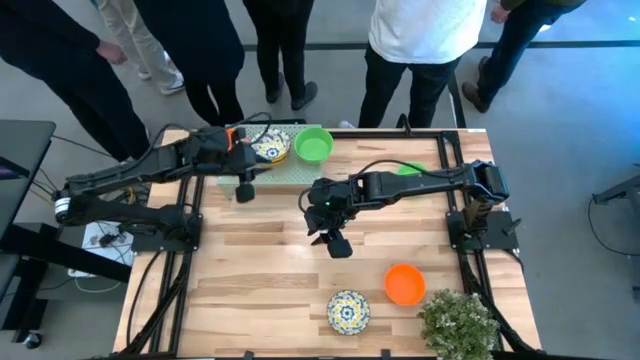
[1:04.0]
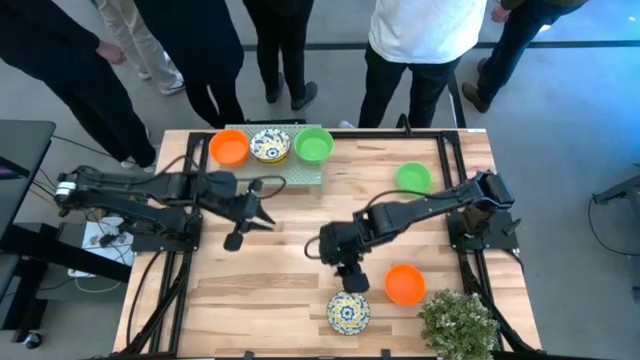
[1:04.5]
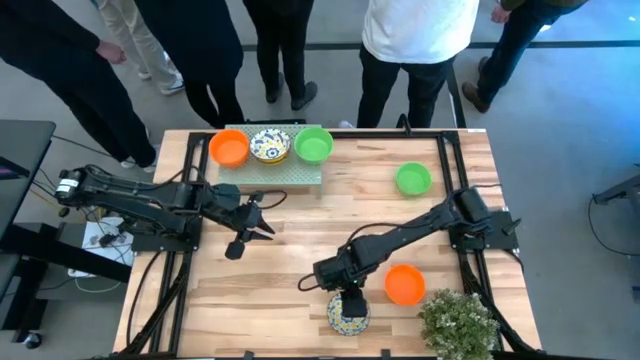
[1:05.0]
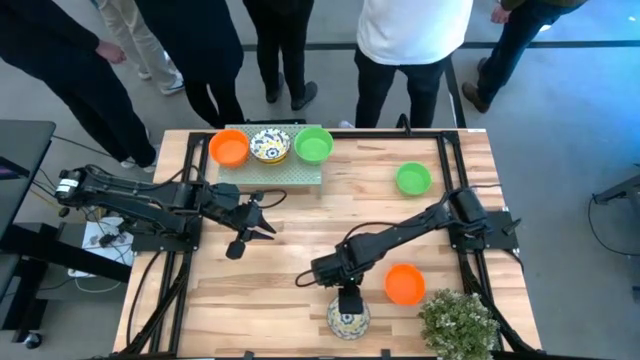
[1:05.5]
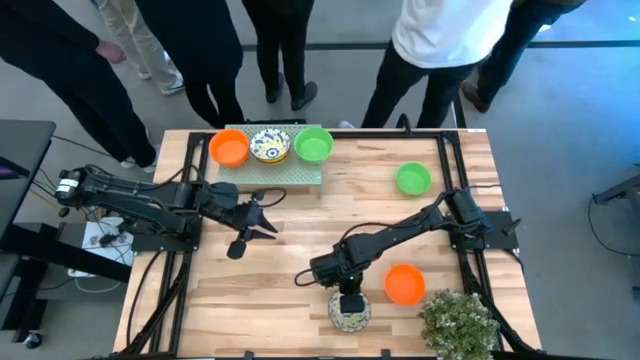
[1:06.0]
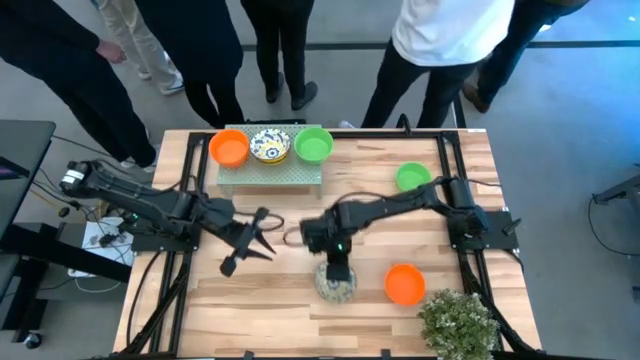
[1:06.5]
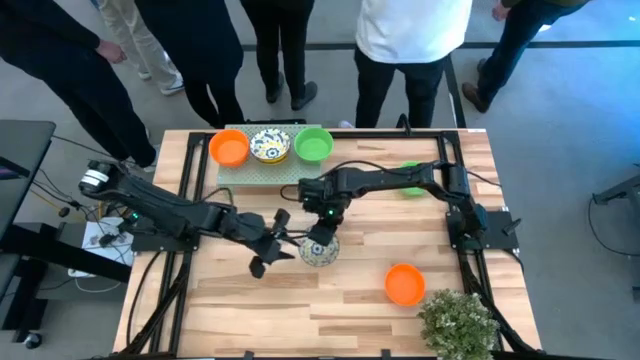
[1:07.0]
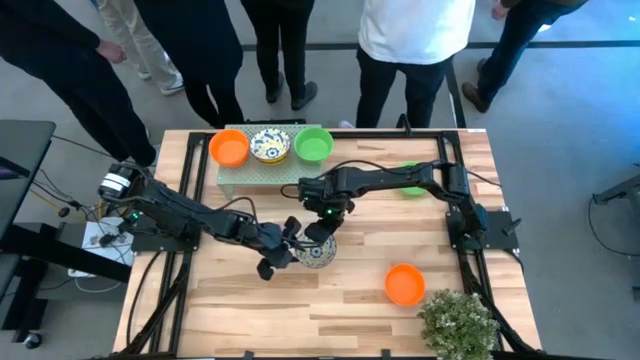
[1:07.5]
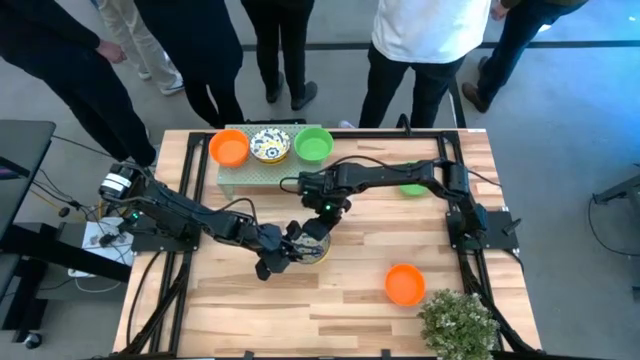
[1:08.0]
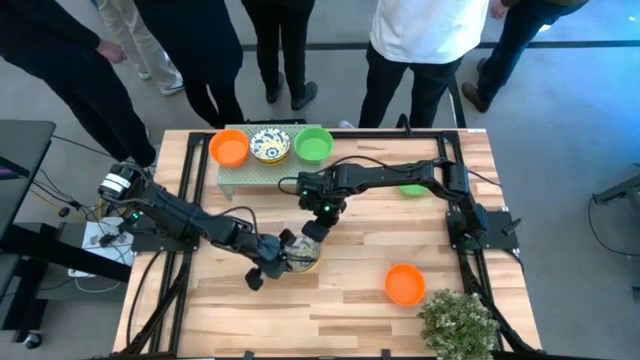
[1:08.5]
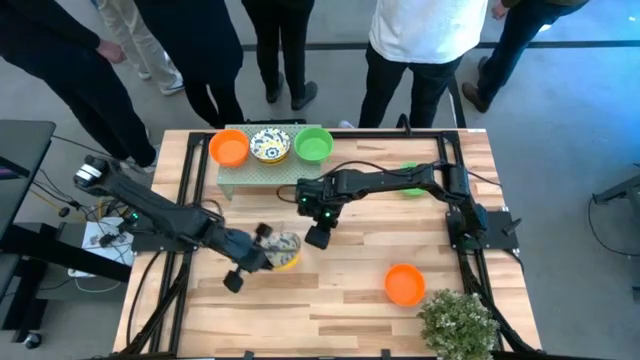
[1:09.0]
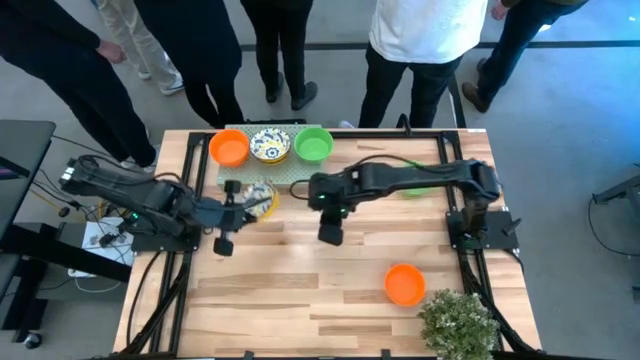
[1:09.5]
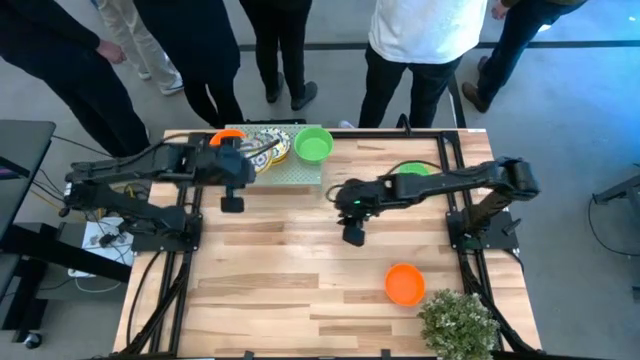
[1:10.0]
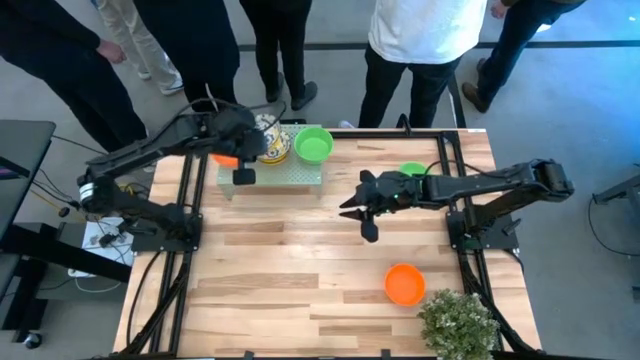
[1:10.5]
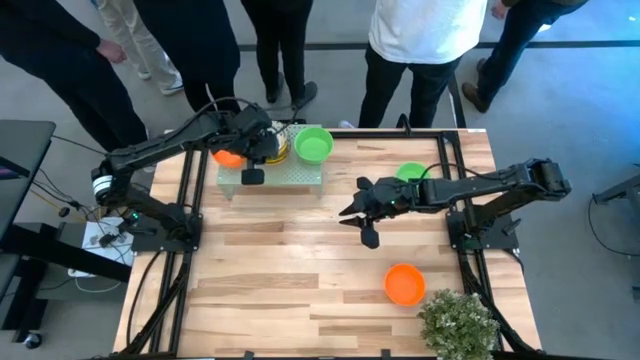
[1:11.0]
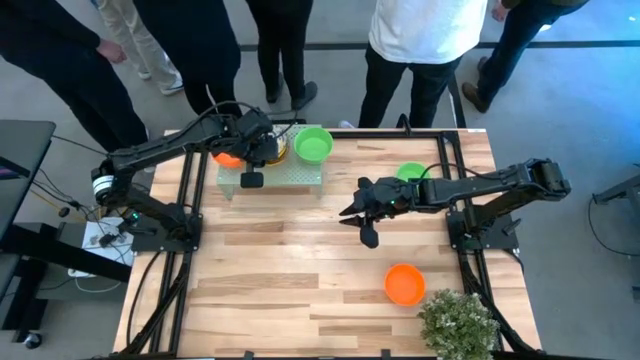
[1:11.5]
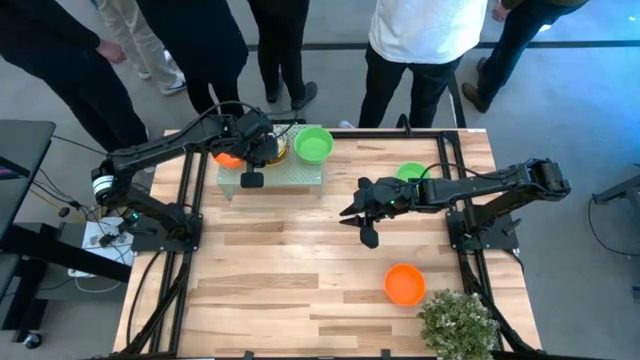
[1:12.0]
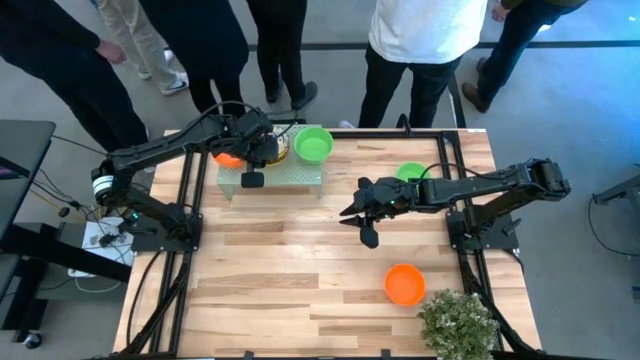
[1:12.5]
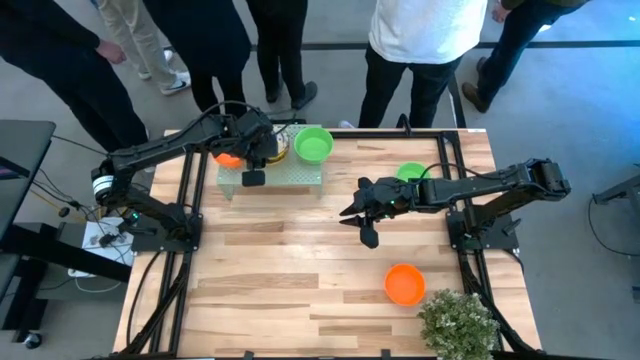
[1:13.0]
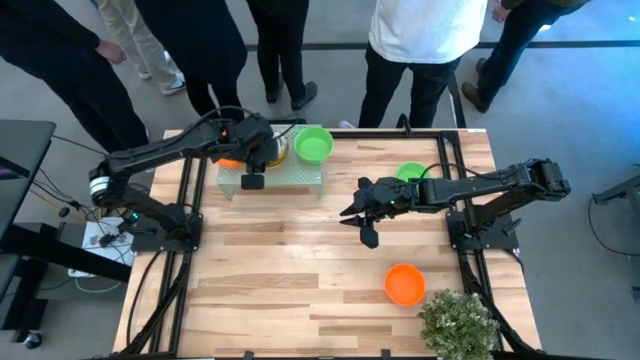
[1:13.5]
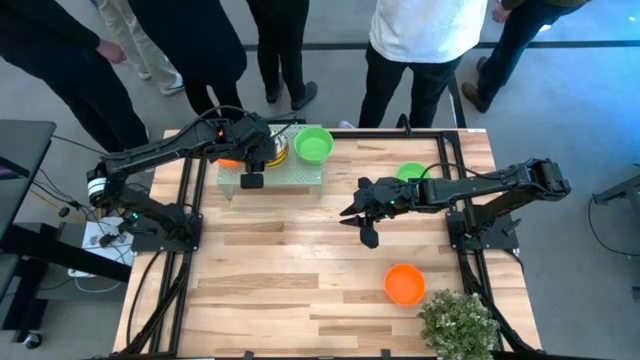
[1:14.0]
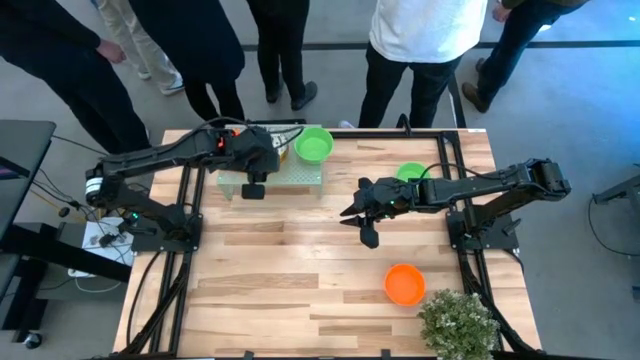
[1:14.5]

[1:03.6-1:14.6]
Task: Pick & Place Mini bowls
Stack the white patterned bowl on top of the other white patterned bowl on the shelf

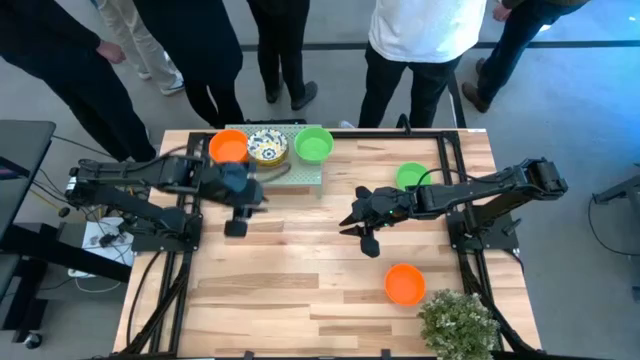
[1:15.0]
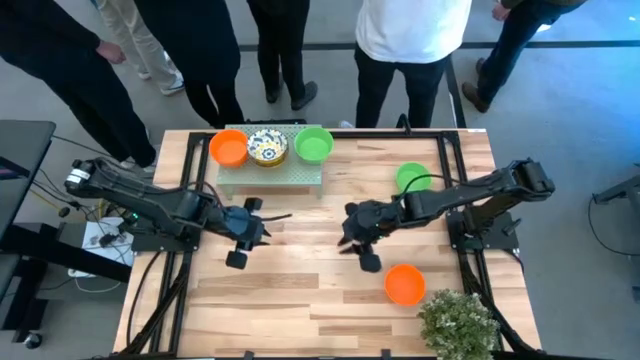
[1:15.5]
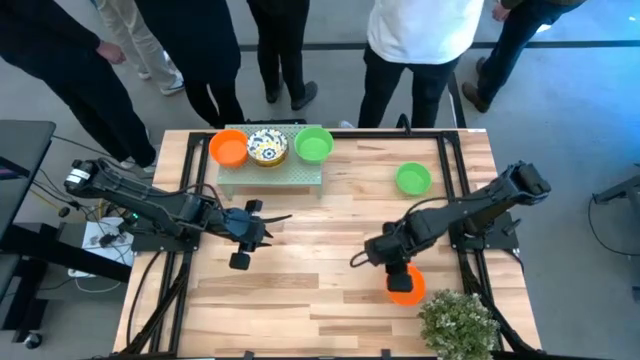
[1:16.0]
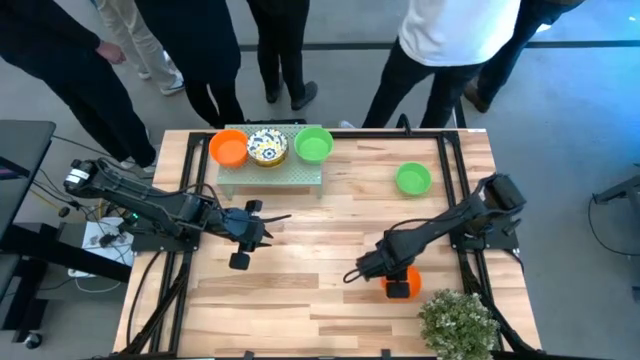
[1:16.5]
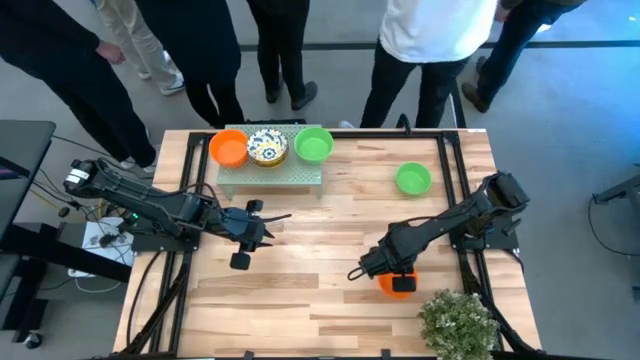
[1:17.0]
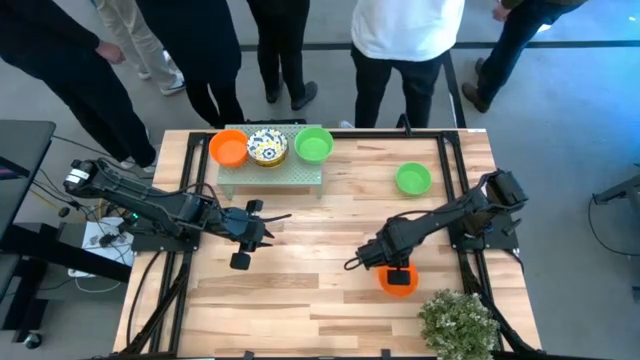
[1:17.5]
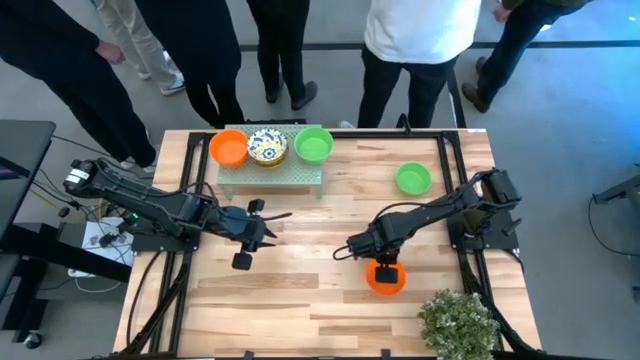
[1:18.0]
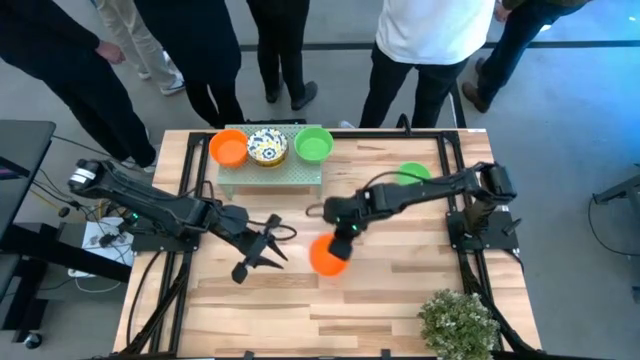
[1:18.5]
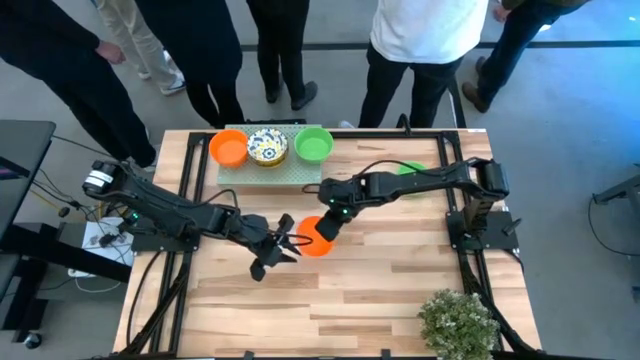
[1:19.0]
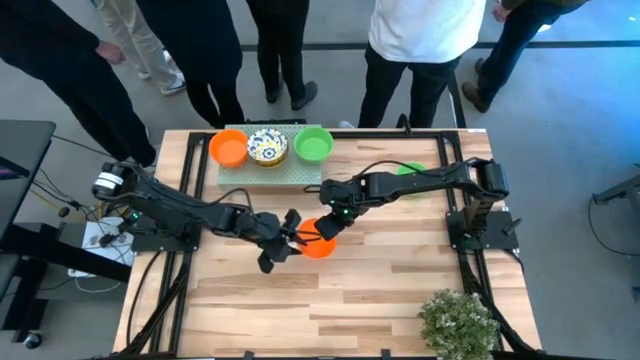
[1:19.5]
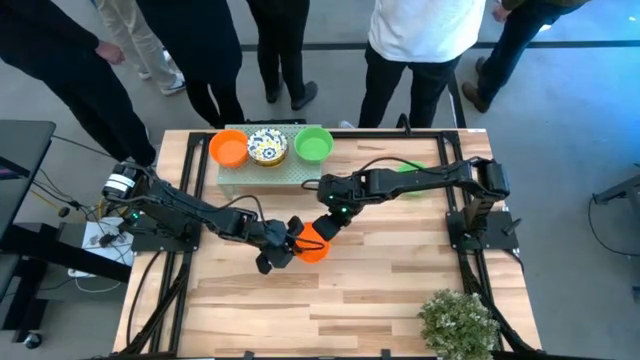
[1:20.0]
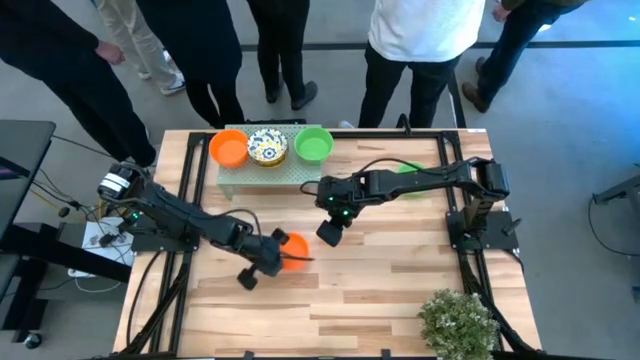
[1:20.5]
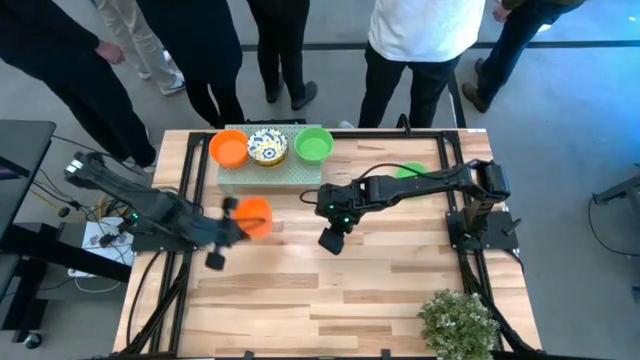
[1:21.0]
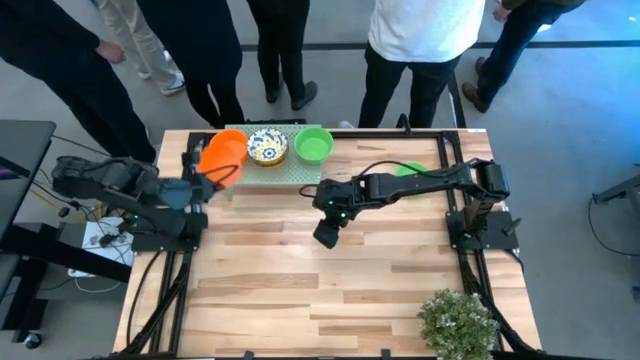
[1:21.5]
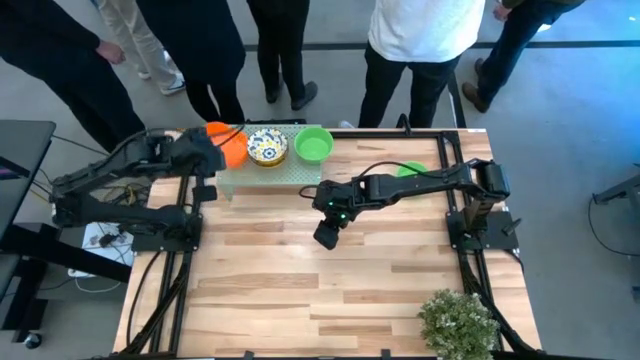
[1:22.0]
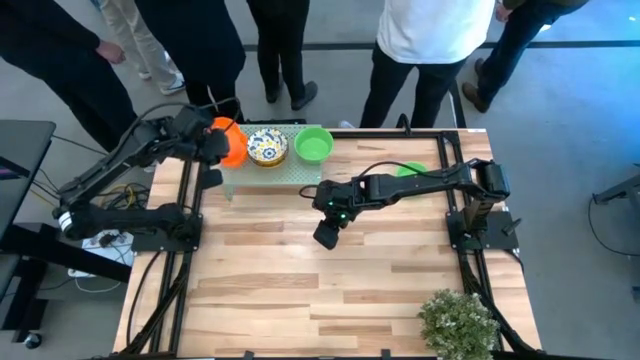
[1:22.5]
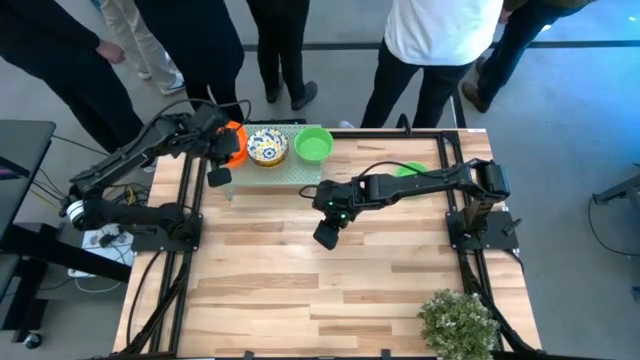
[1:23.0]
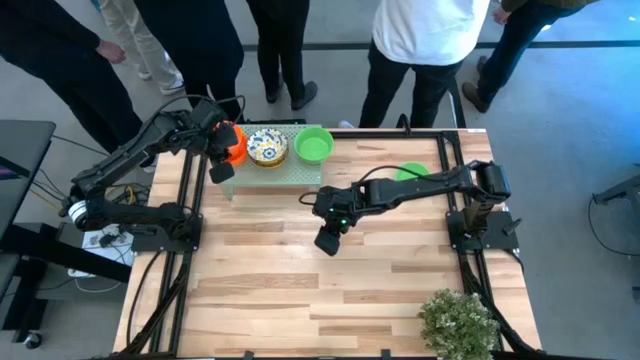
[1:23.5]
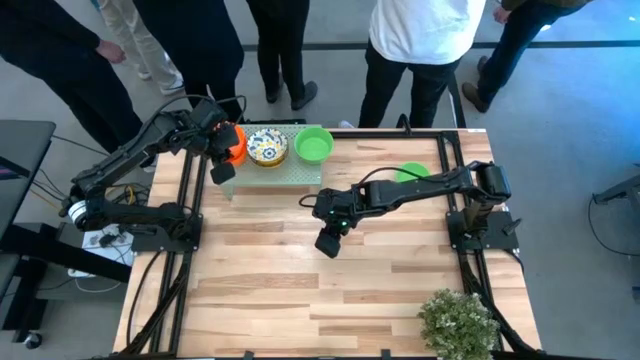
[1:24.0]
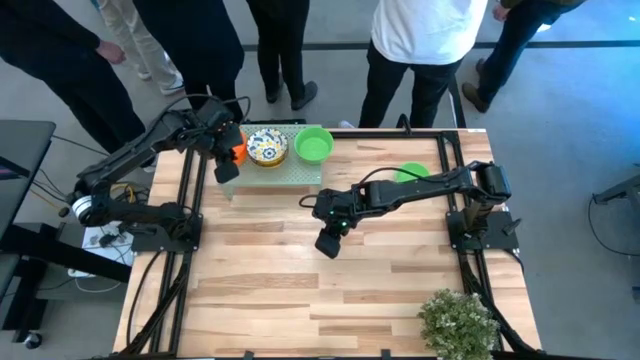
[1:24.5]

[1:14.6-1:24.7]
Stack the orange bowl on top of the other orange bowl on the shelf

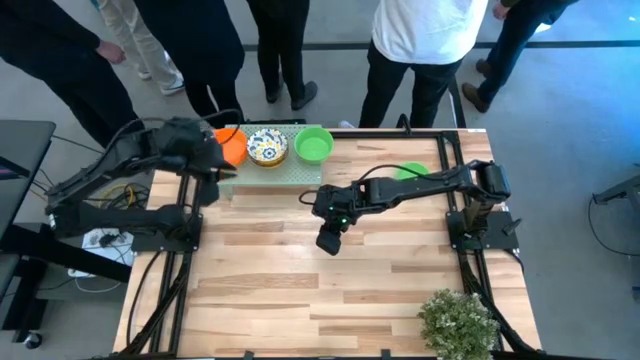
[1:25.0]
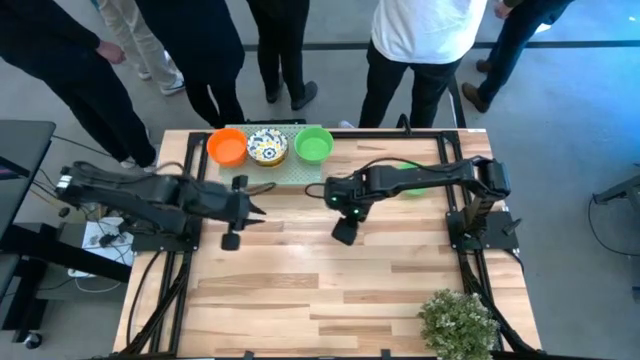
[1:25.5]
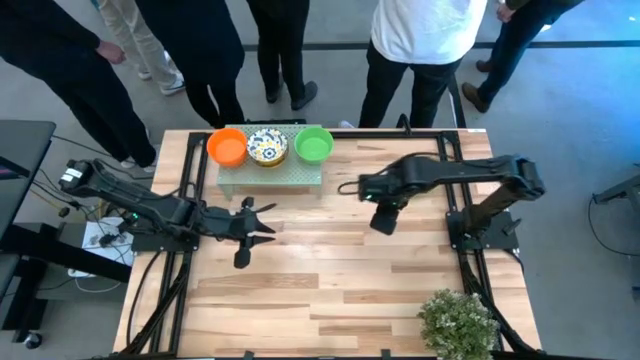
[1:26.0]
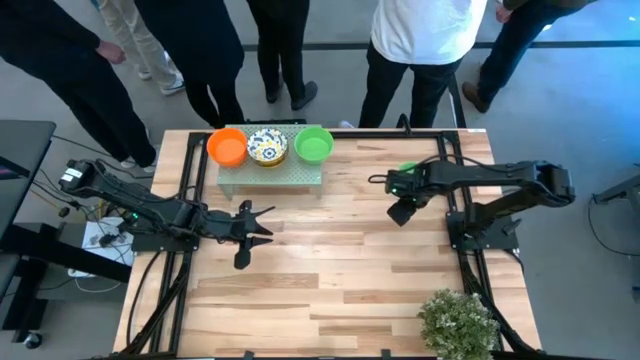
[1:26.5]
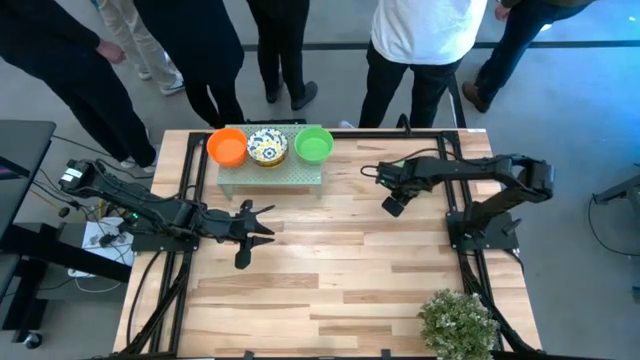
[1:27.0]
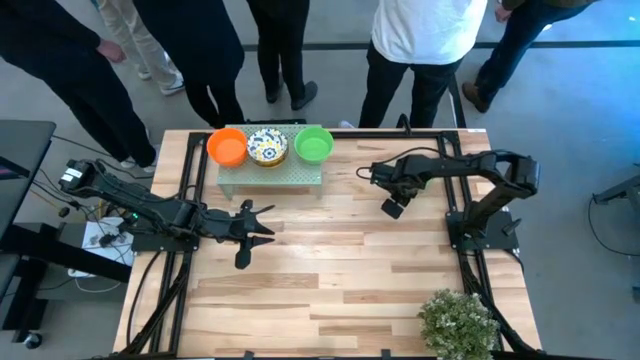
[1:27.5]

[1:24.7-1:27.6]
Stack the green bowl on top of the other green bowl on the shelf
